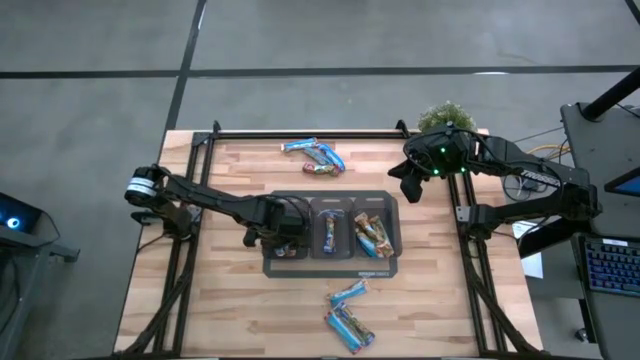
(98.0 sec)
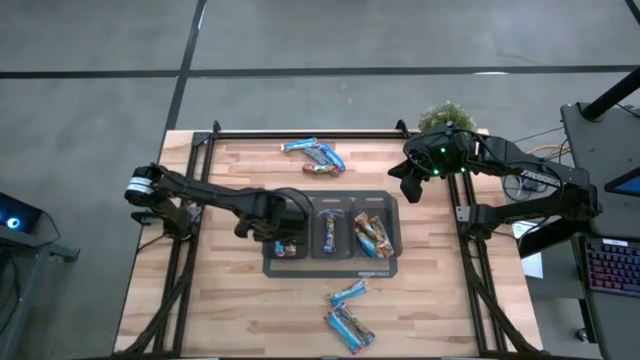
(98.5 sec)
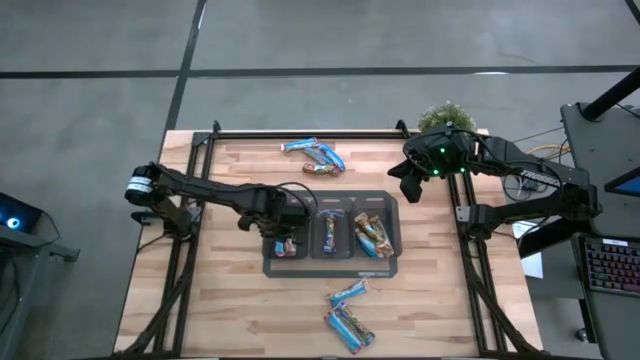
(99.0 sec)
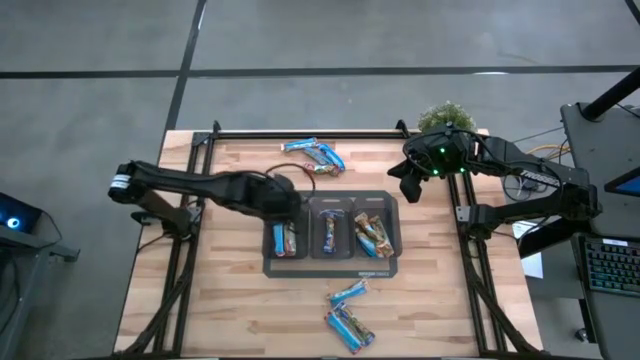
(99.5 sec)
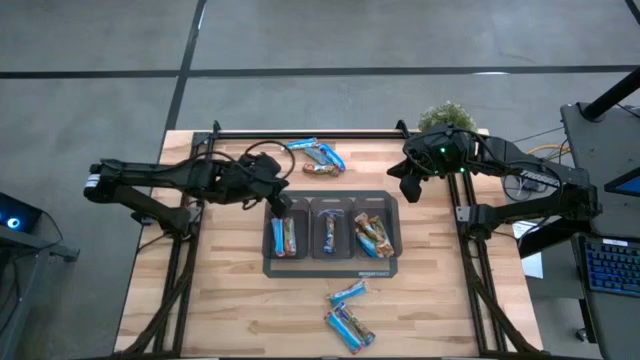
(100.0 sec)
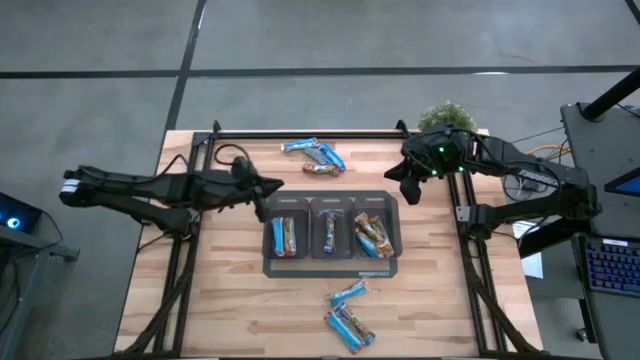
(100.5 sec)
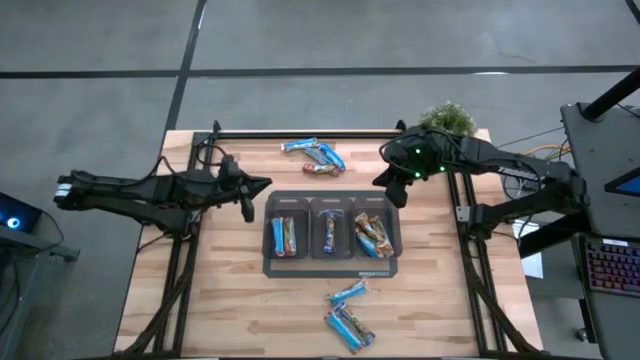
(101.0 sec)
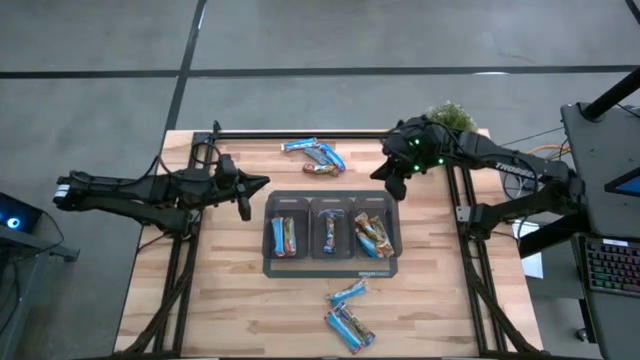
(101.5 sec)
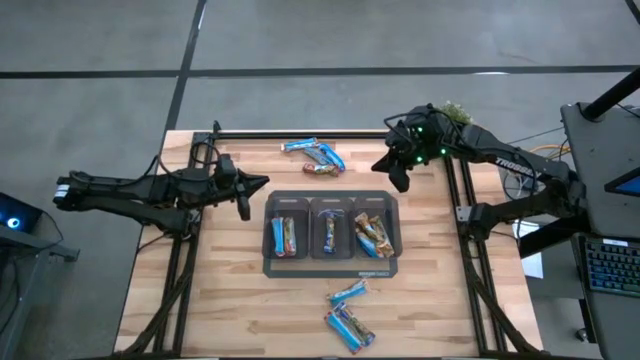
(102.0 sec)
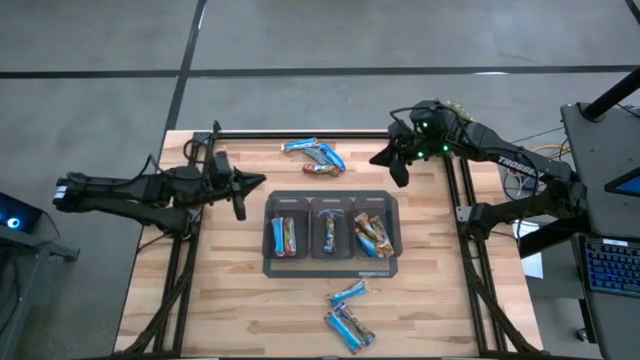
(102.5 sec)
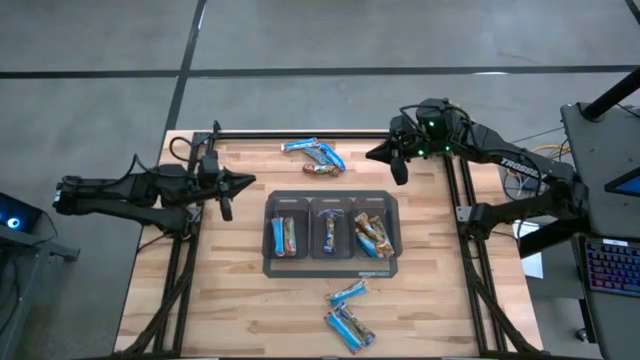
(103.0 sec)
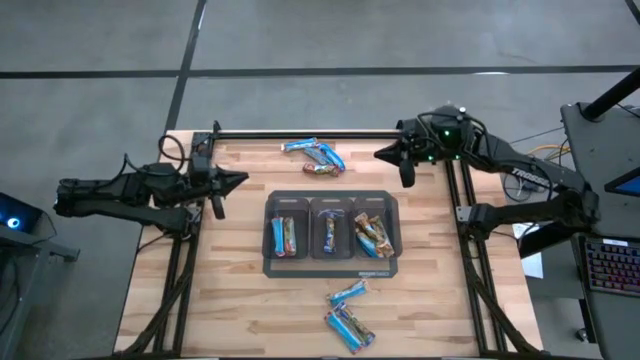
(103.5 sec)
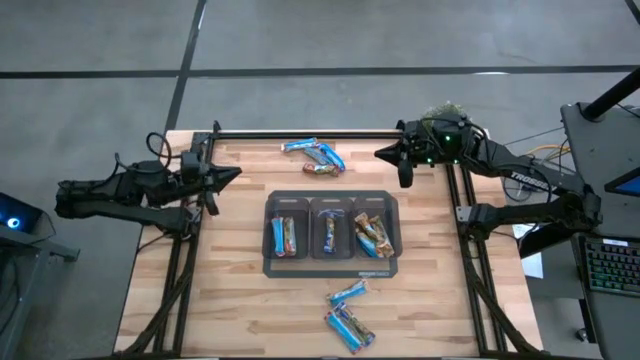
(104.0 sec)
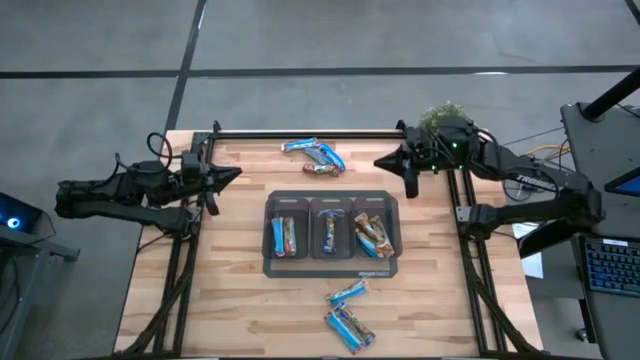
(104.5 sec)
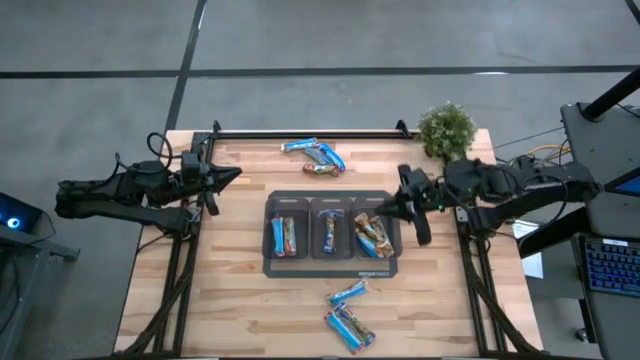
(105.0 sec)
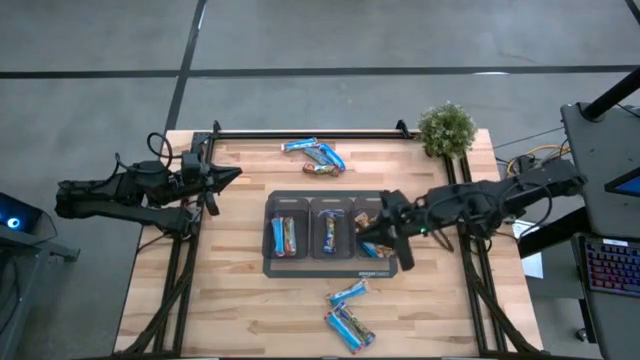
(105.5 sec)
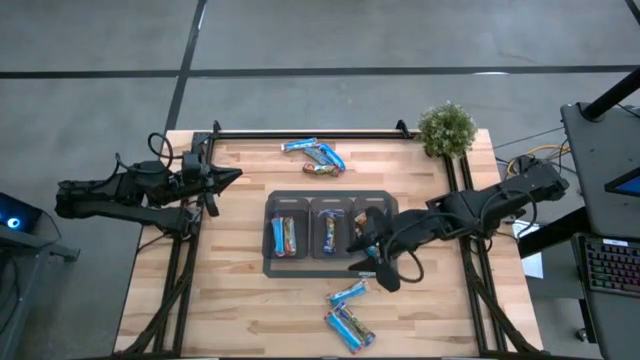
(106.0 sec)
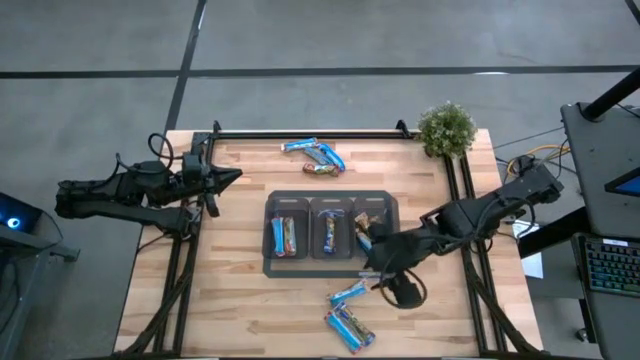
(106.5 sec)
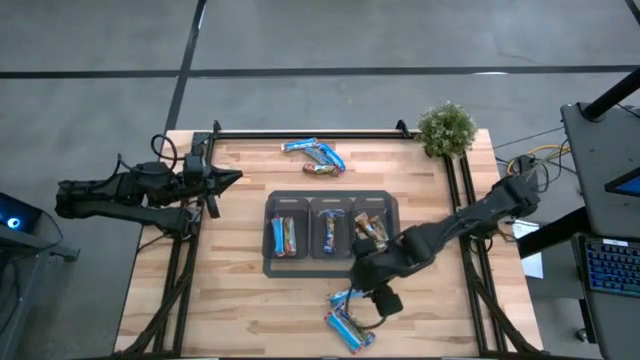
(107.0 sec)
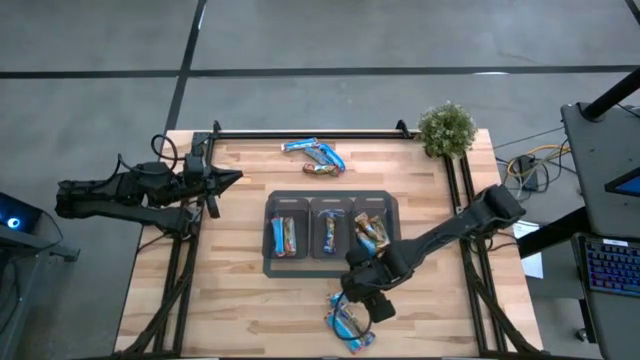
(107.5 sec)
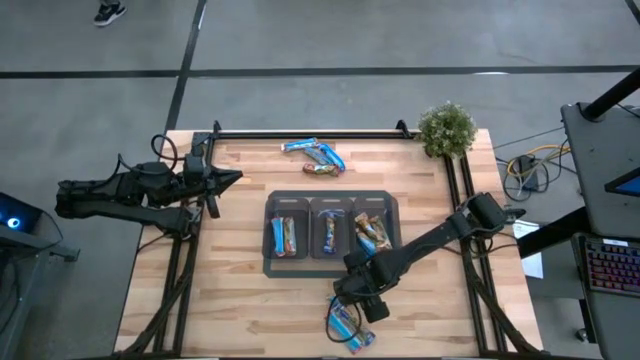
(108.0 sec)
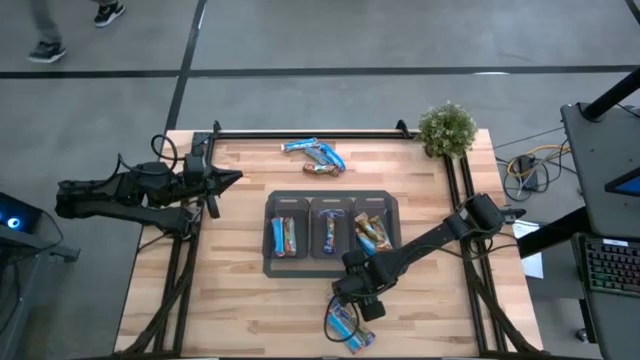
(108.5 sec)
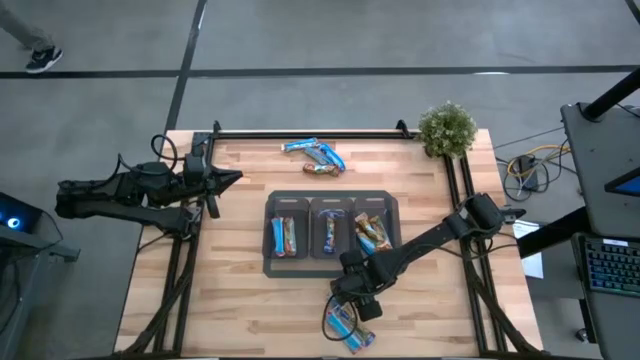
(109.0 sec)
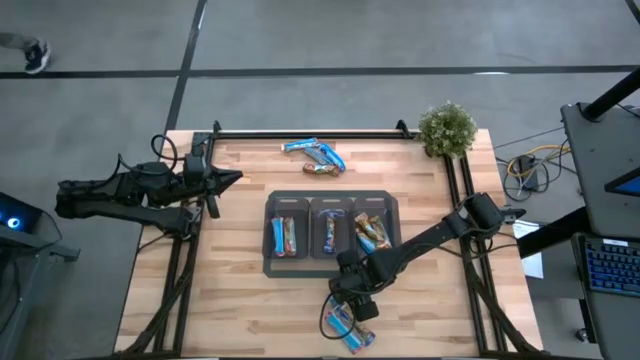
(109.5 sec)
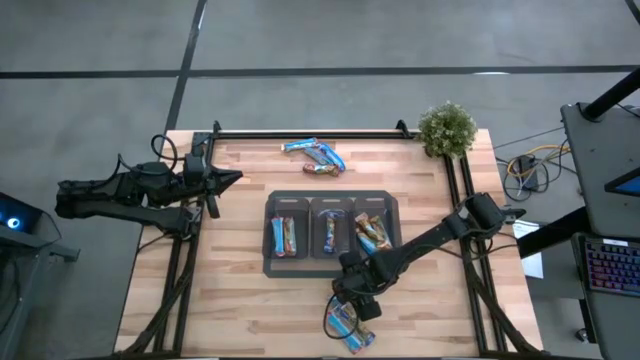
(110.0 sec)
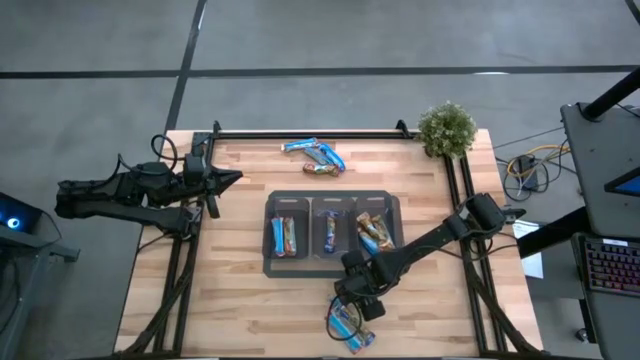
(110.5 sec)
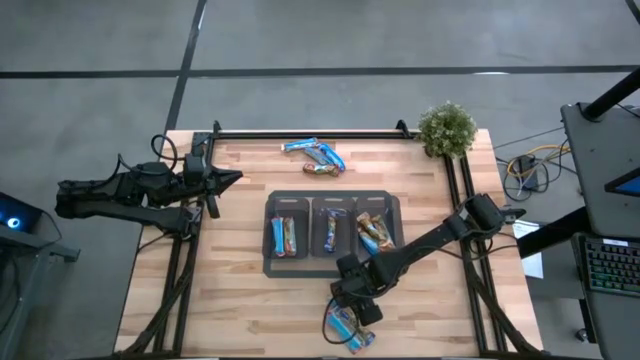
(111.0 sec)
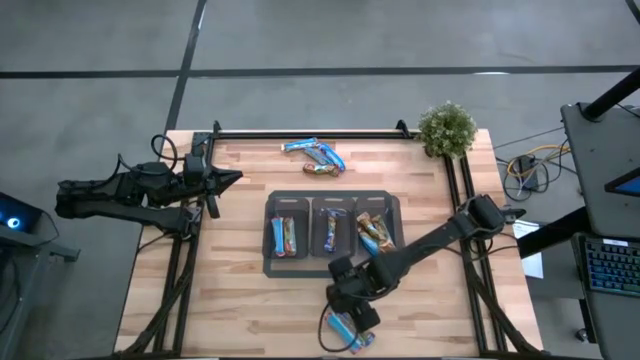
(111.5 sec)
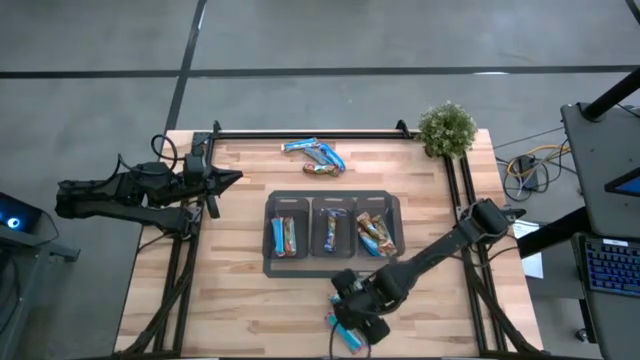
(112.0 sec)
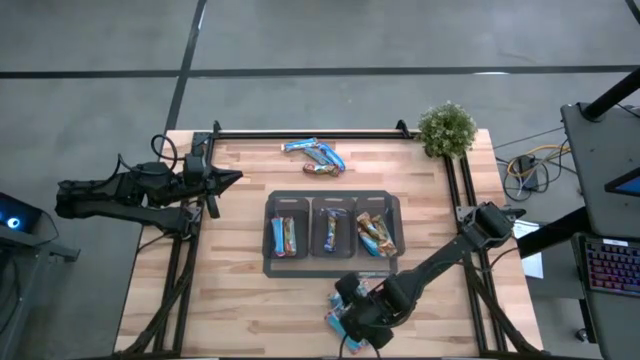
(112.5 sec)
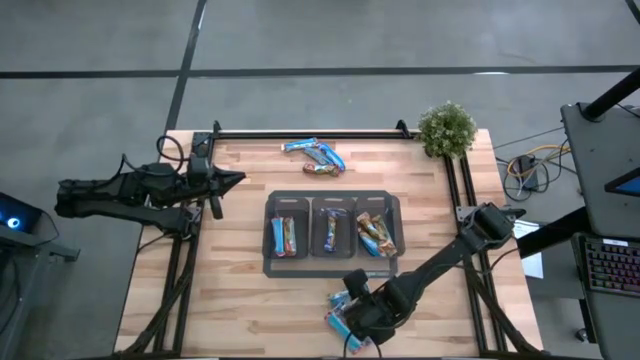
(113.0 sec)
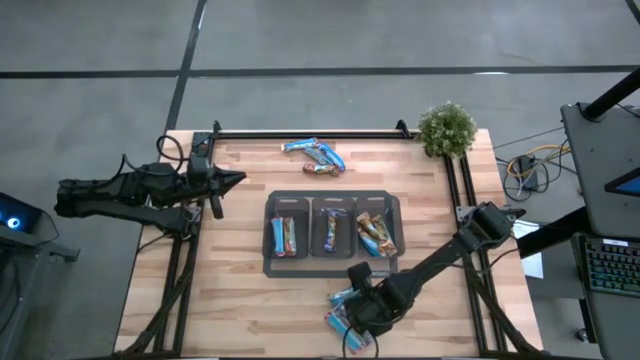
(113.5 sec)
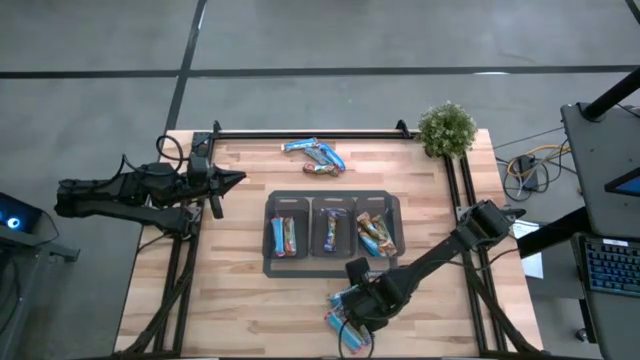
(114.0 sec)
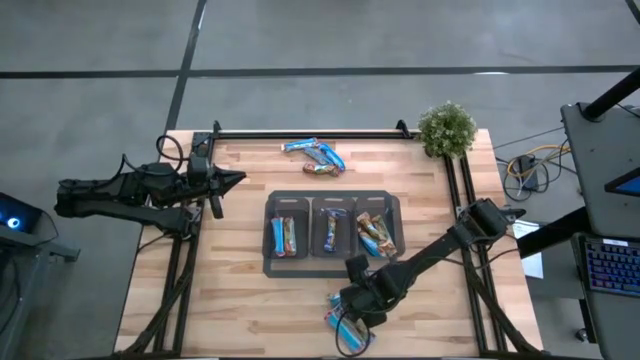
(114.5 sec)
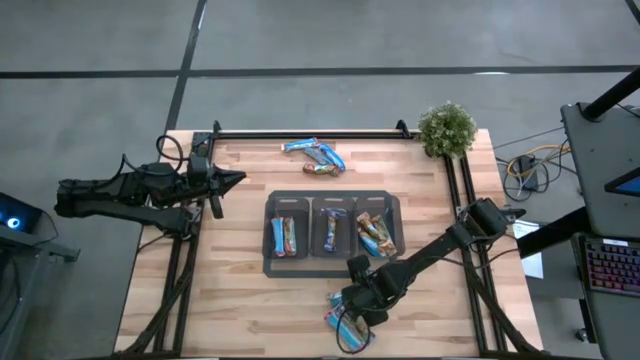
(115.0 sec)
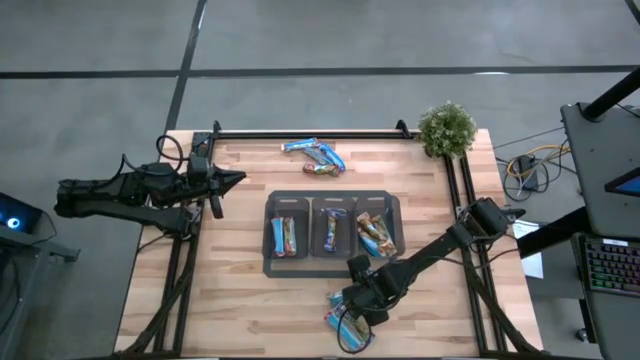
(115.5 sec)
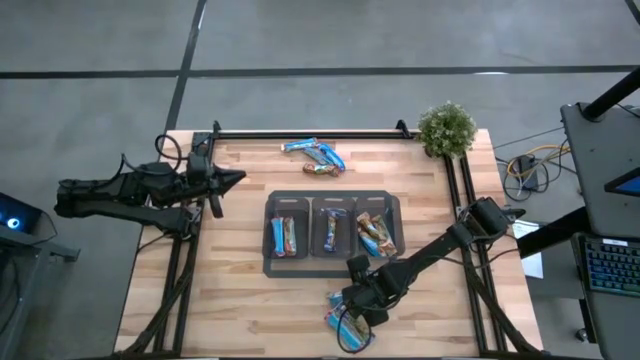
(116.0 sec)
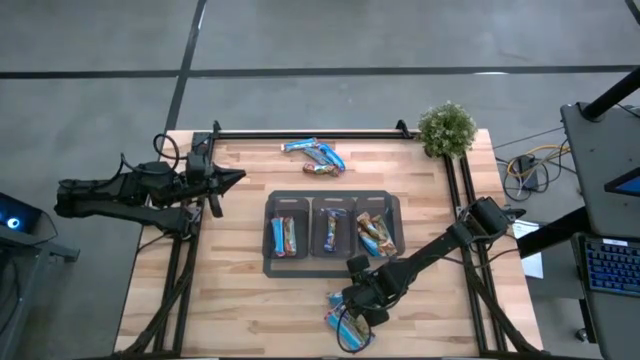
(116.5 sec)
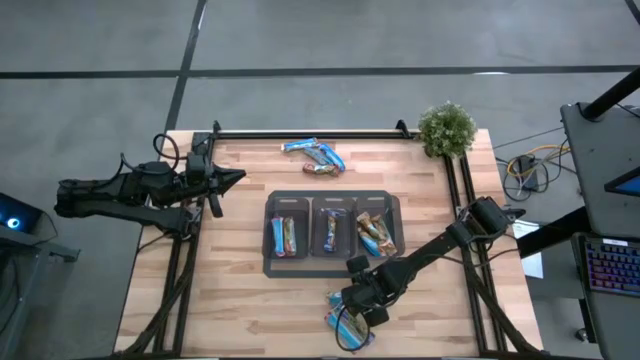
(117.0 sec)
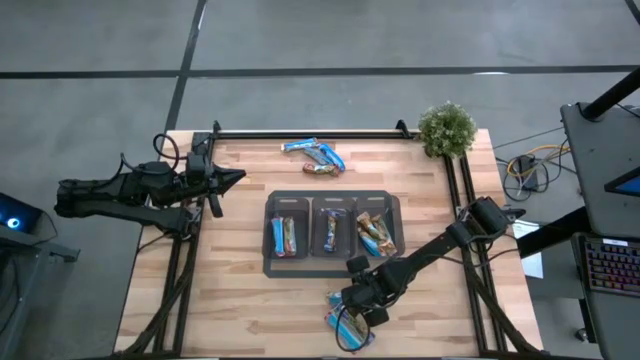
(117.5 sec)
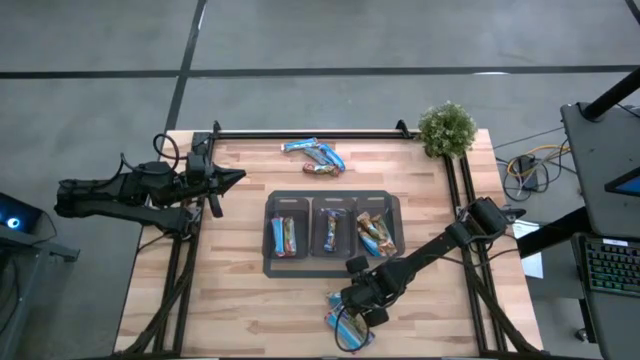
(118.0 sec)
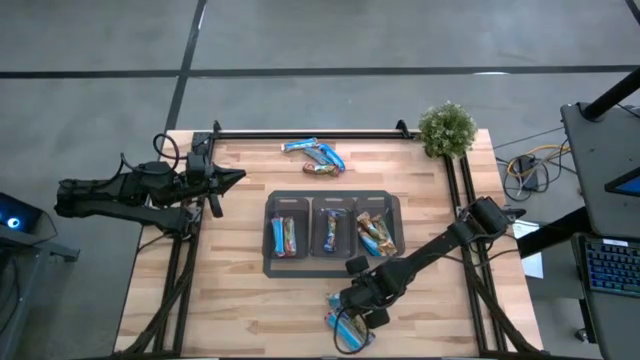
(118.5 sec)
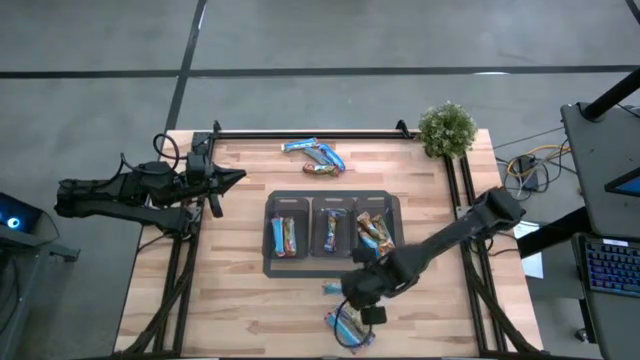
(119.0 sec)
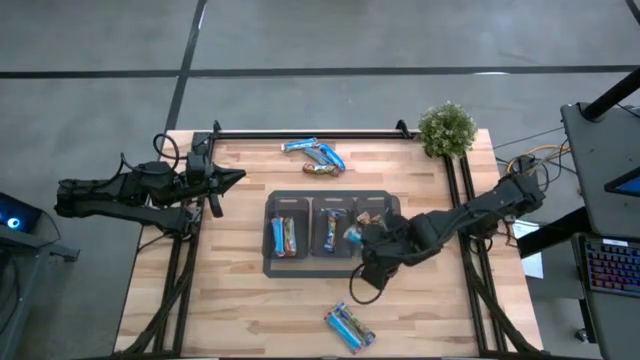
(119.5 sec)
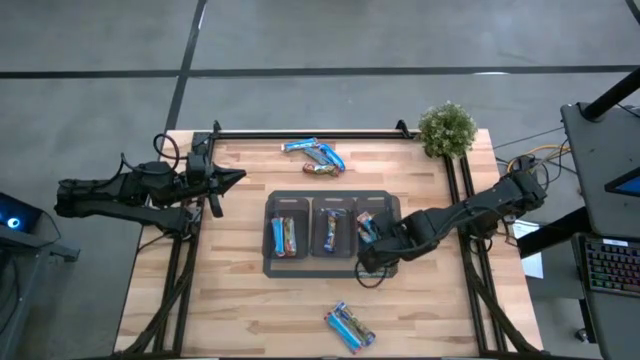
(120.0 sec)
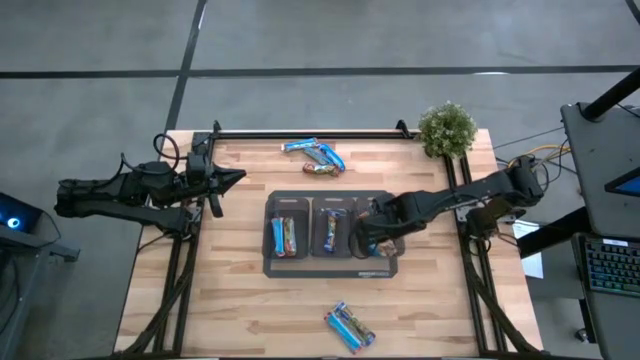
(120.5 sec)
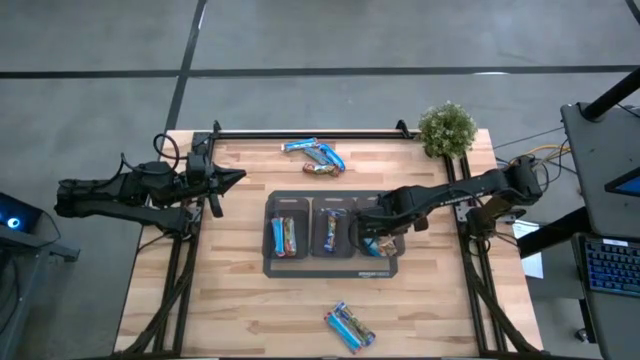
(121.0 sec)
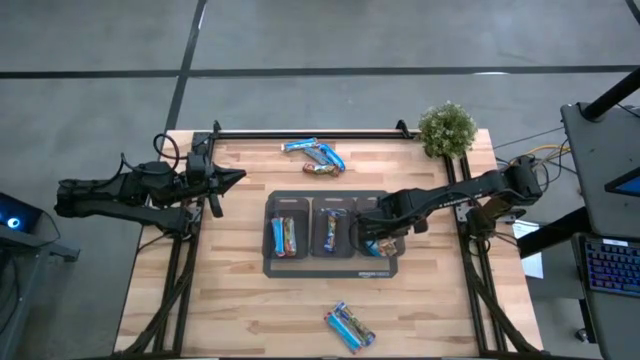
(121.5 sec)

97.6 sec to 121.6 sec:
Task: Pick and place Granola Bars by type
Put the yellow granola bar into the right black bin
